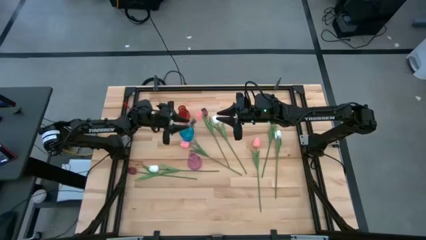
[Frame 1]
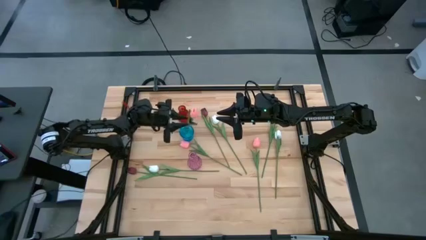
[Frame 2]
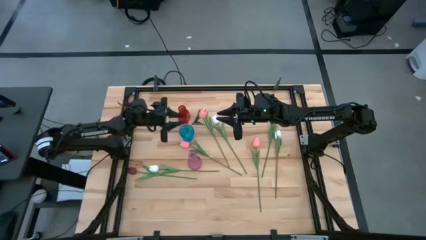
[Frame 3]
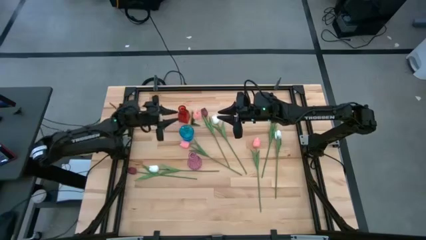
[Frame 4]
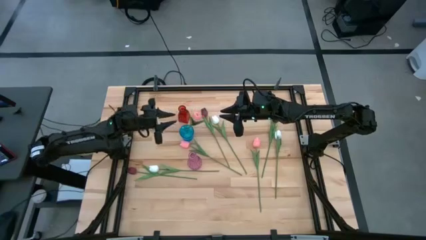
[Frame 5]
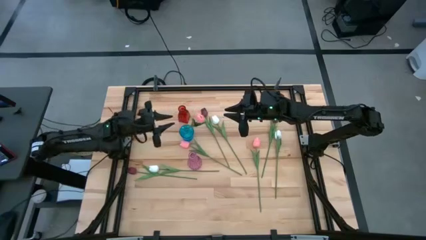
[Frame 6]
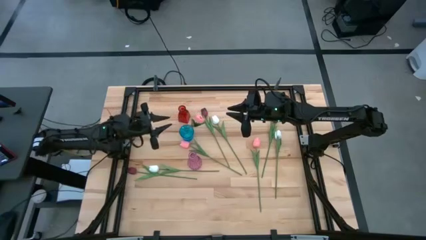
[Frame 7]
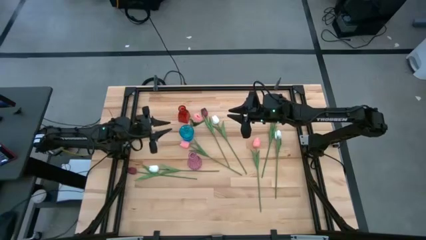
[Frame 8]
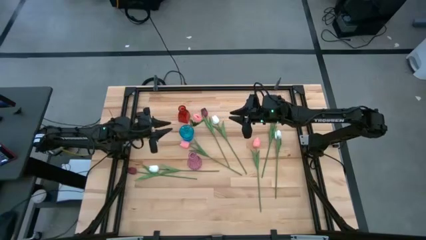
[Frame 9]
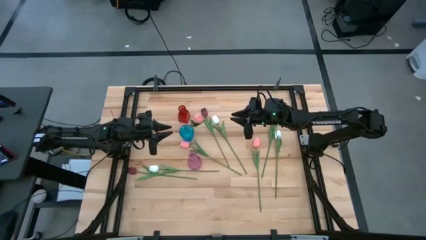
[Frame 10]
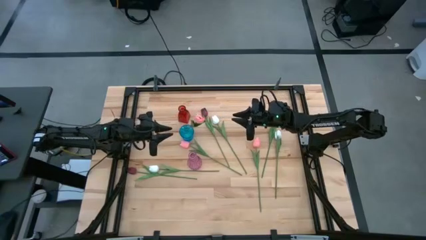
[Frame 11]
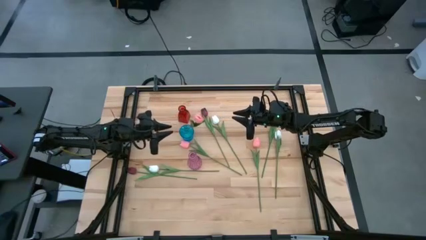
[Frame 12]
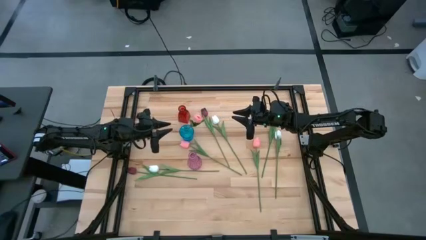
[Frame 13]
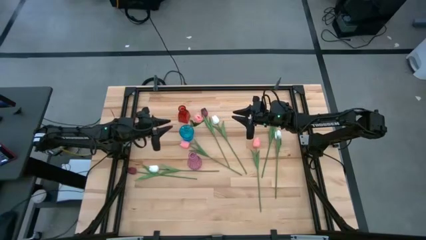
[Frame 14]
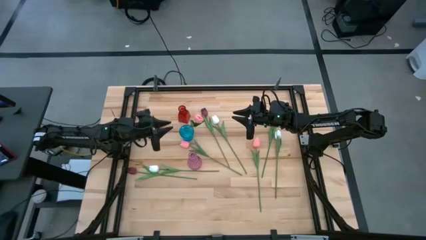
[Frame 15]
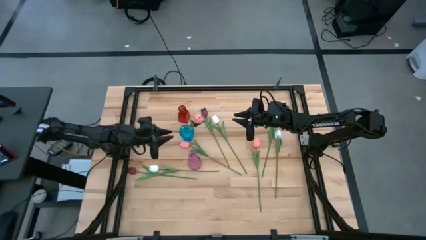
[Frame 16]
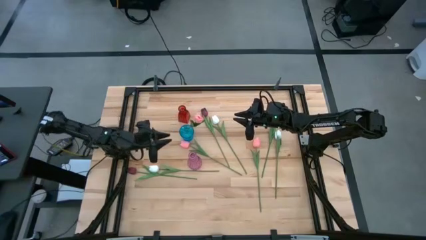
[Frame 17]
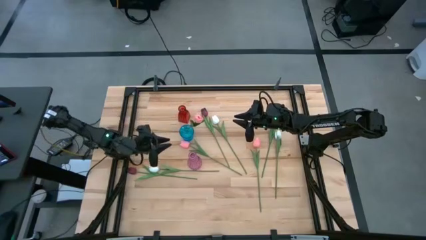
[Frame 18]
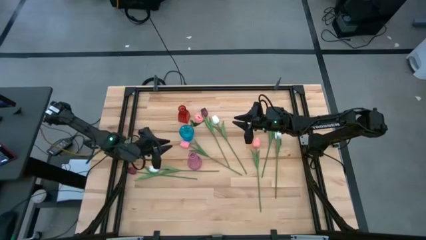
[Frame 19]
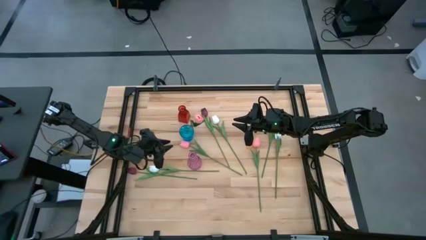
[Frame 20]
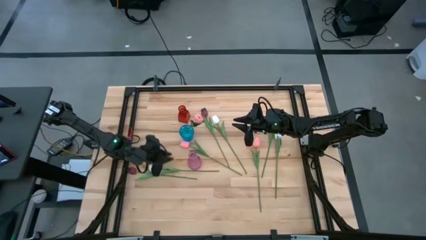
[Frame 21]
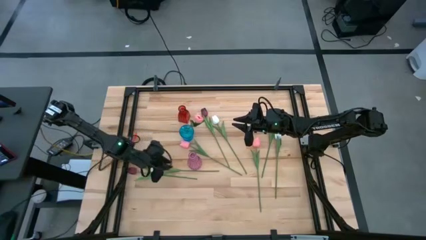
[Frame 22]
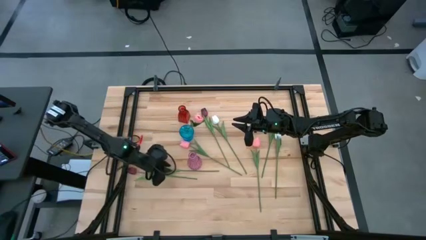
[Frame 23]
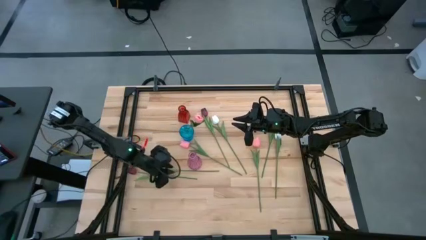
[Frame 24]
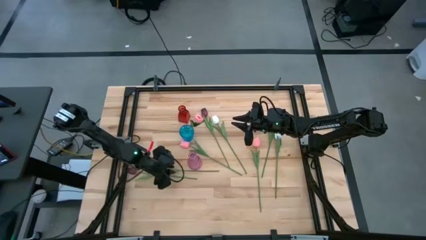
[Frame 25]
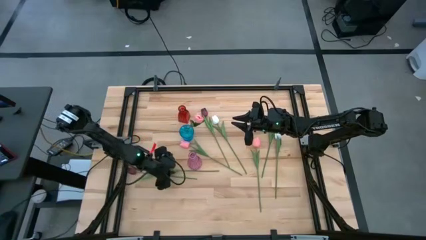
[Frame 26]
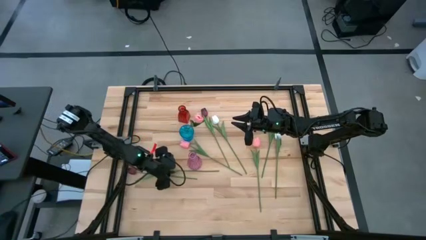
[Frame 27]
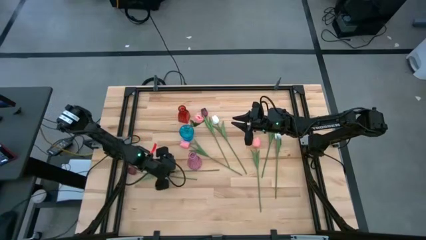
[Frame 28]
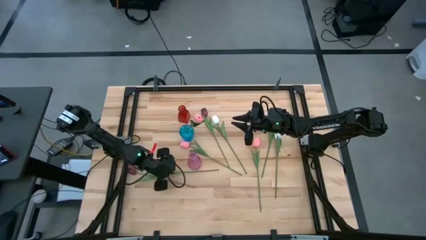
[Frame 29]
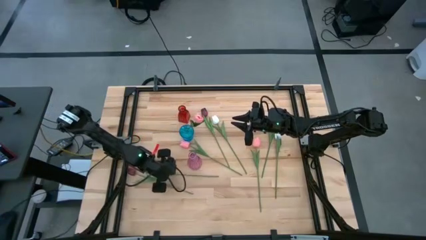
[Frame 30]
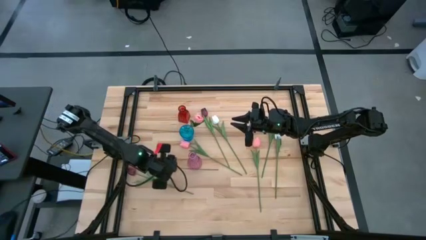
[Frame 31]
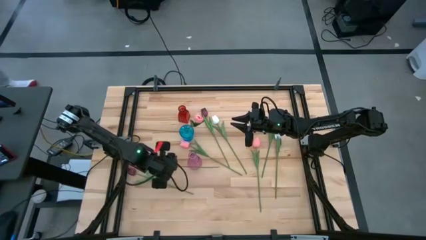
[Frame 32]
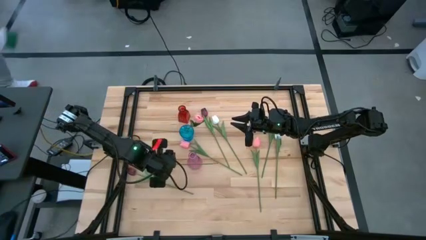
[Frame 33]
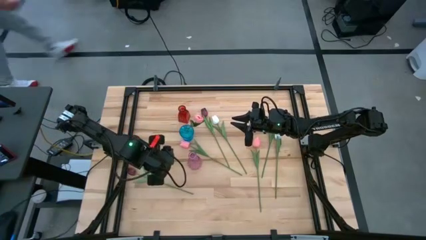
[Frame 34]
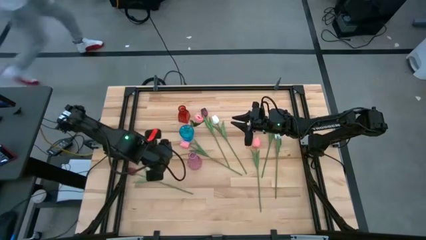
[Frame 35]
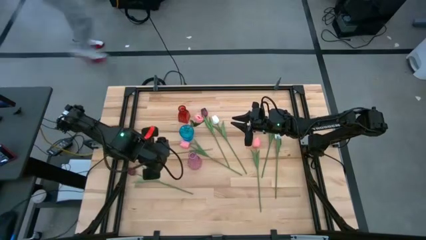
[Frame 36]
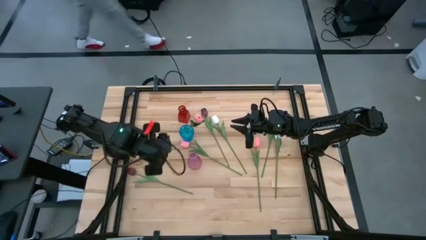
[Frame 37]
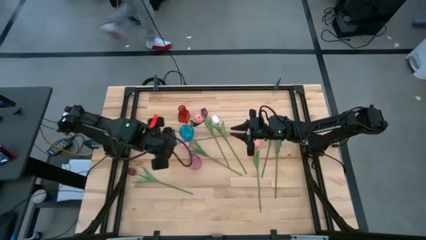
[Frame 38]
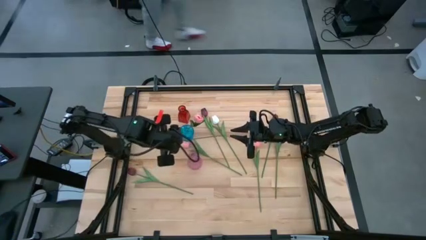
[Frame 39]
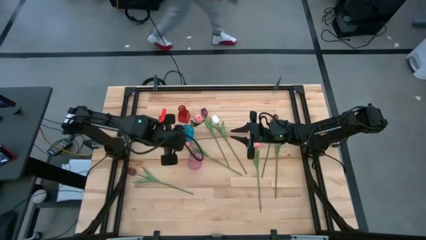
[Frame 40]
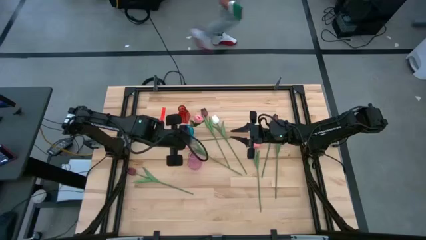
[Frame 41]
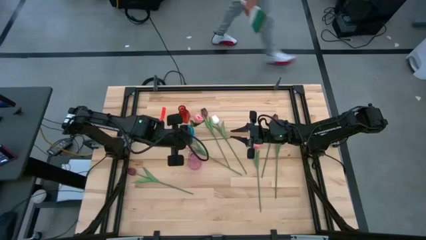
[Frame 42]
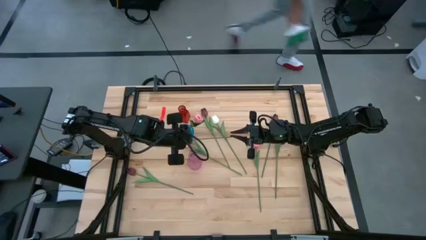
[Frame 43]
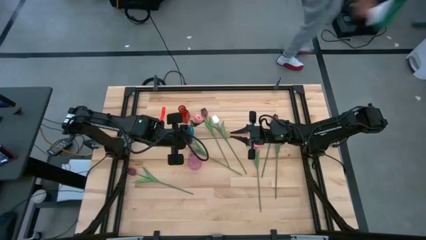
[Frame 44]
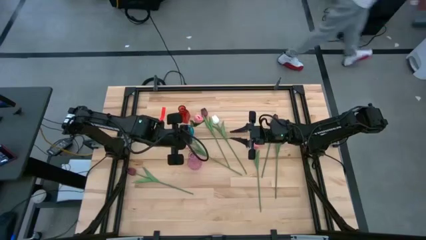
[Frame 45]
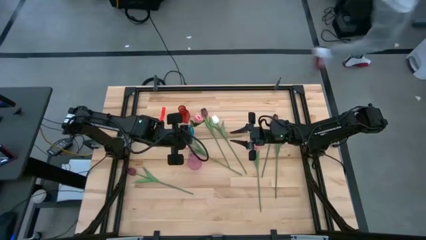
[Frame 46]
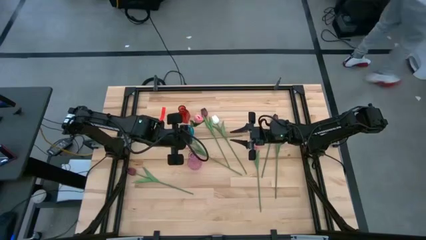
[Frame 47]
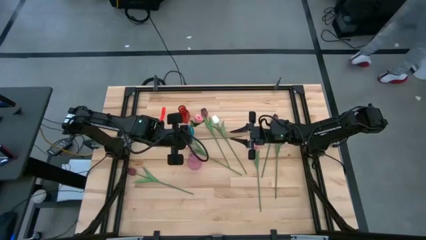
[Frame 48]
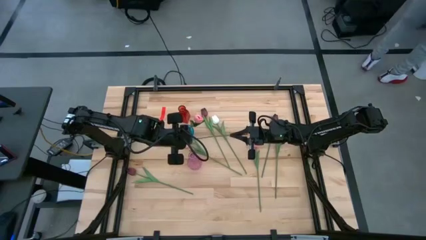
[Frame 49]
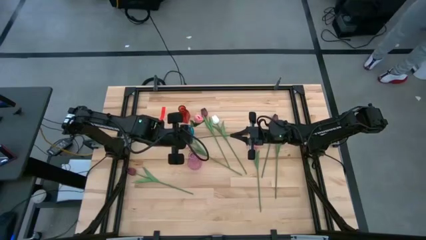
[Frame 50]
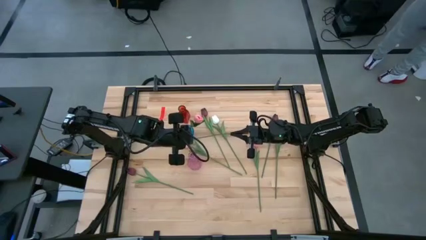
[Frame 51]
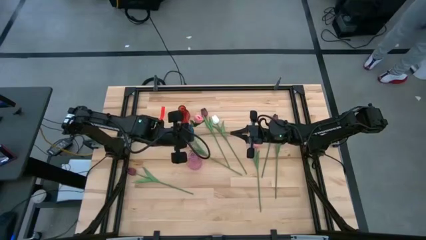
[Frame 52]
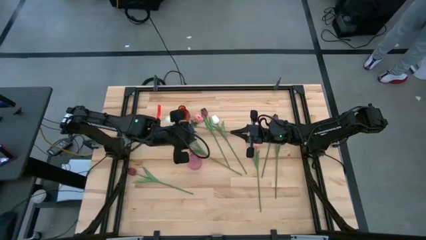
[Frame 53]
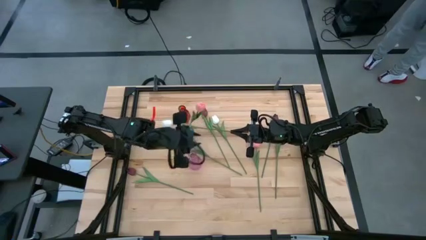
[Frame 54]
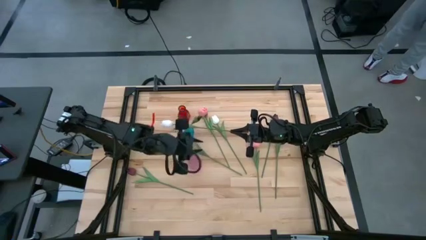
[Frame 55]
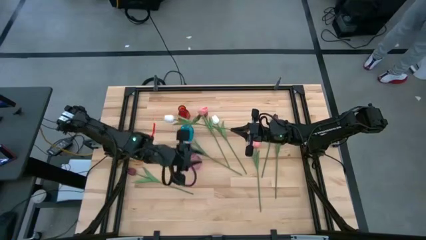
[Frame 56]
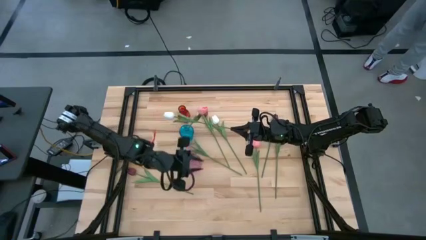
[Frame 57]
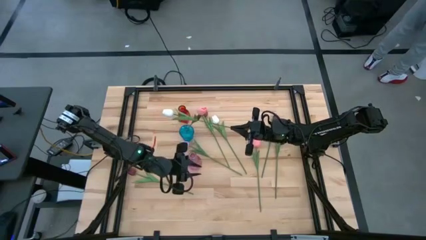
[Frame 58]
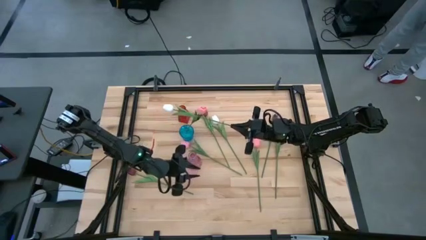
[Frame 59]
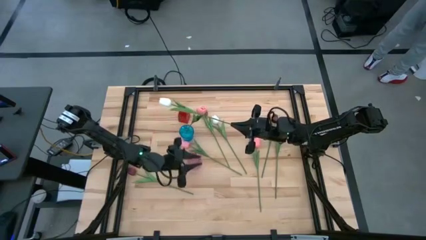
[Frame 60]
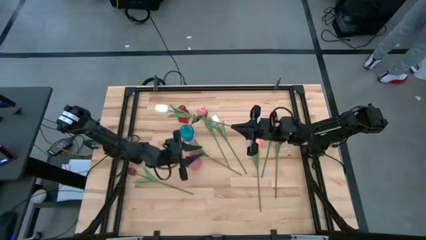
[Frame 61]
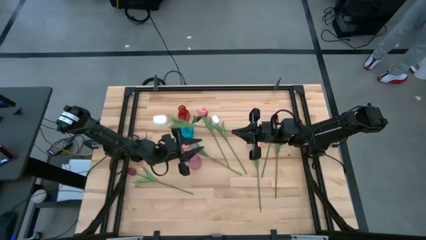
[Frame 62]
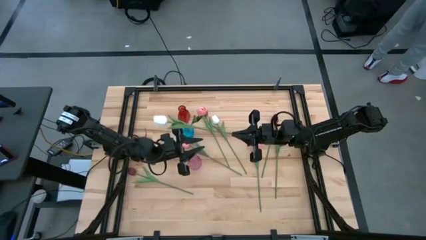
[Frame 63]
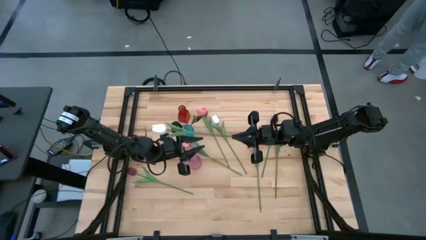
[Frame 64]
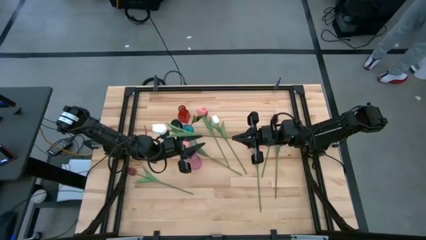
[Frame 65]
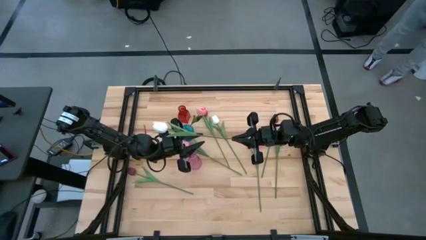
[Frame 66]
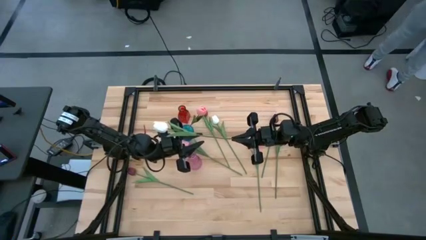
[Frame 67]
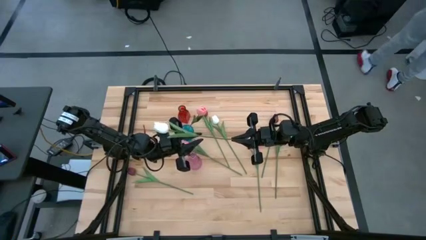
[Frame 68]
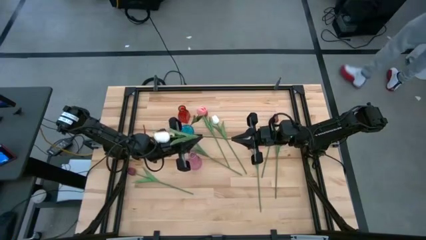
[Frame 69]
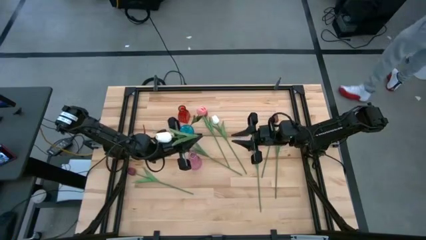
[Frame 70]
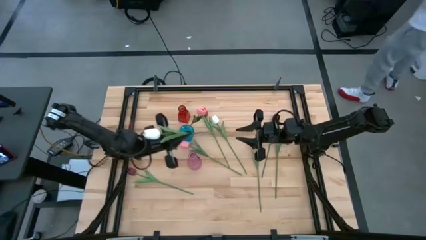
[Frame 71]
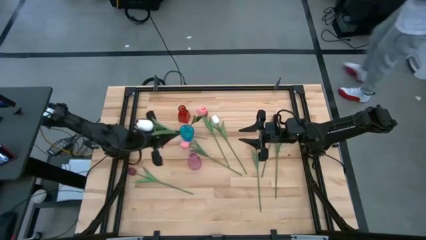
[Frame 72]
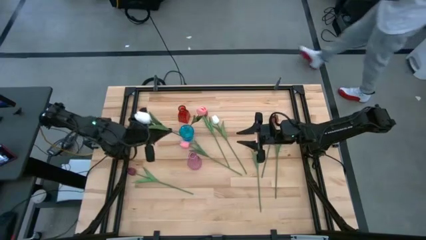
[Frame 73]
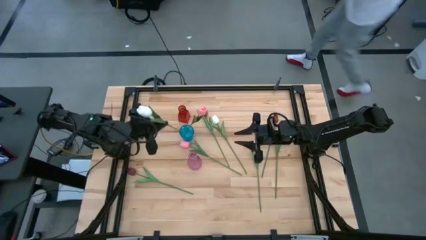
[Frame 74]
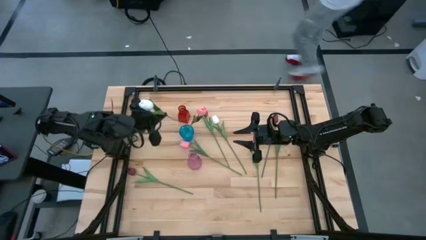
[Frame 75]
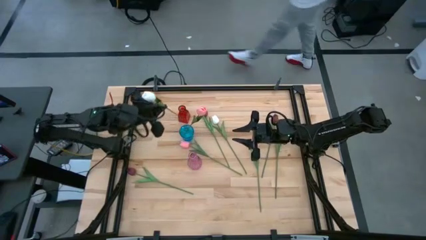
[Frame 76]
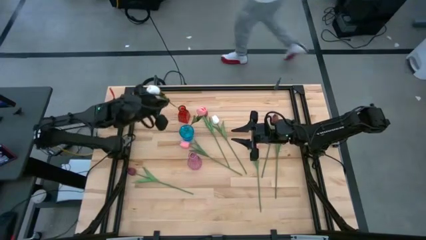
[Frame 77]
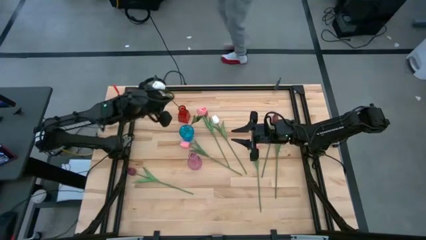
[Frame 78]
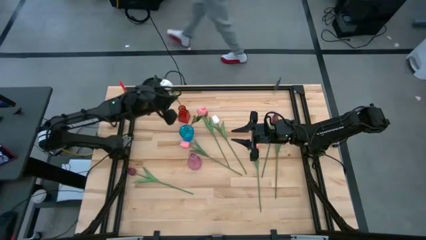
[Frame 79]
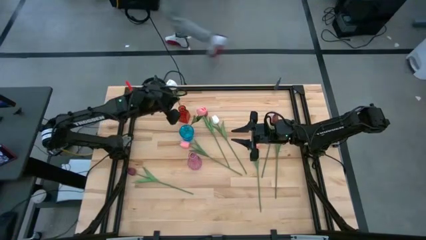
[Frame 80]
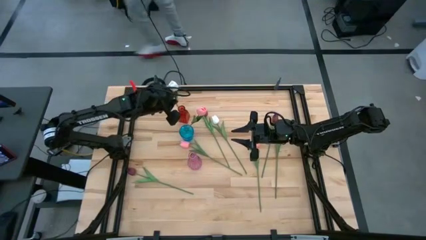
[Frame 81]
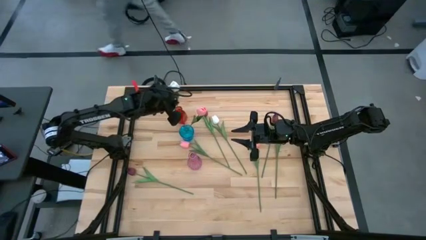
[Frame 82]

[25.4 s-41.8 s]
Task: Sort flowers into vase by color
Put the bottom left white flower into the red vase
